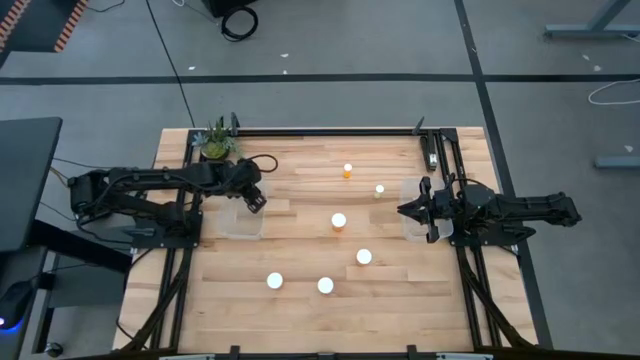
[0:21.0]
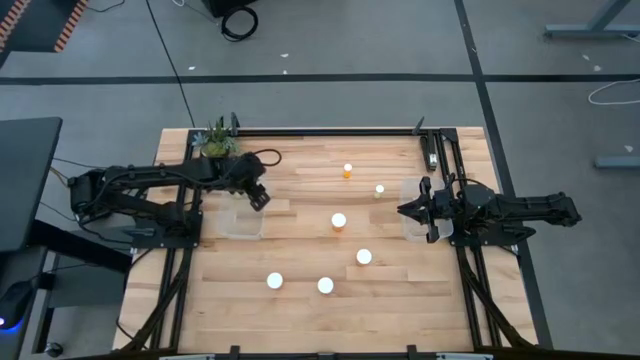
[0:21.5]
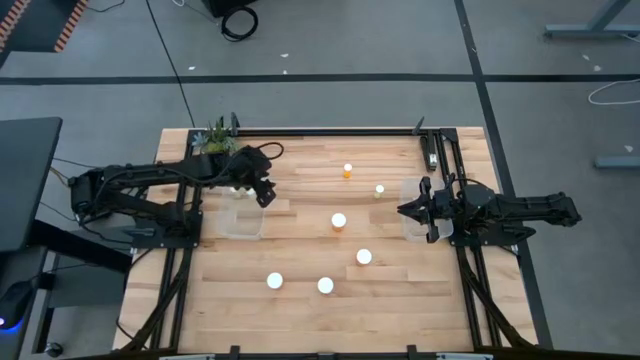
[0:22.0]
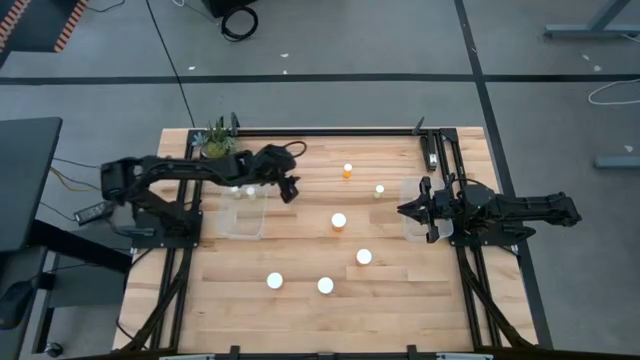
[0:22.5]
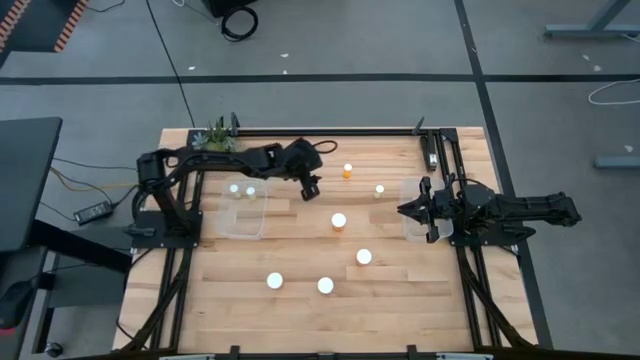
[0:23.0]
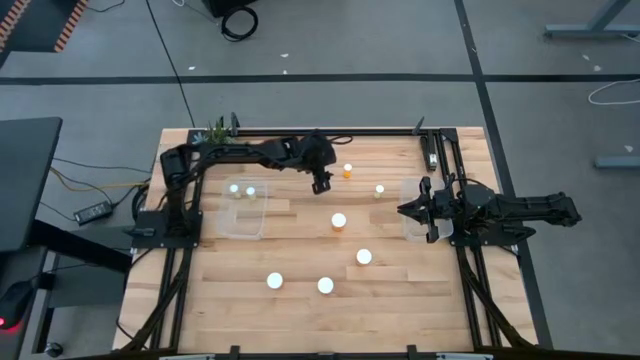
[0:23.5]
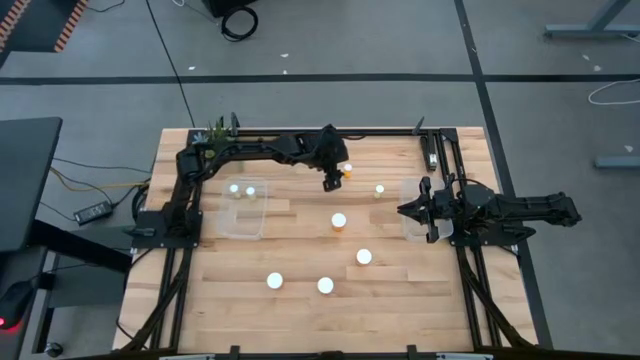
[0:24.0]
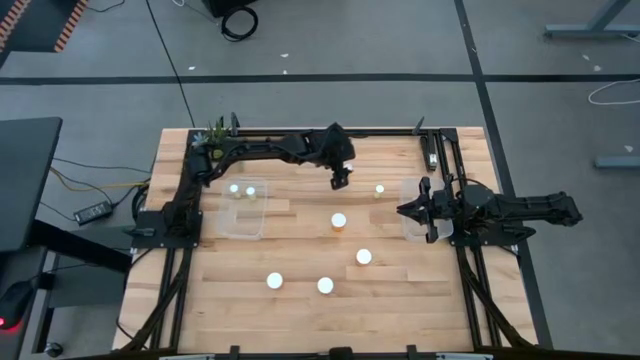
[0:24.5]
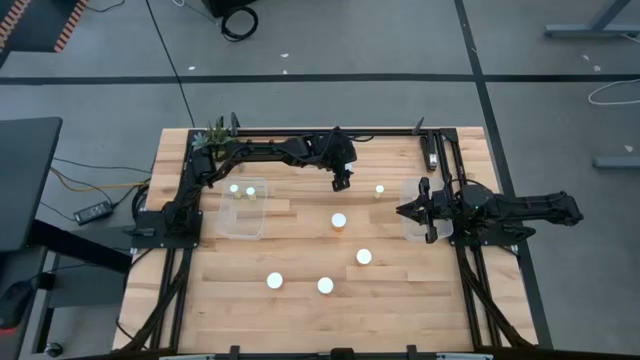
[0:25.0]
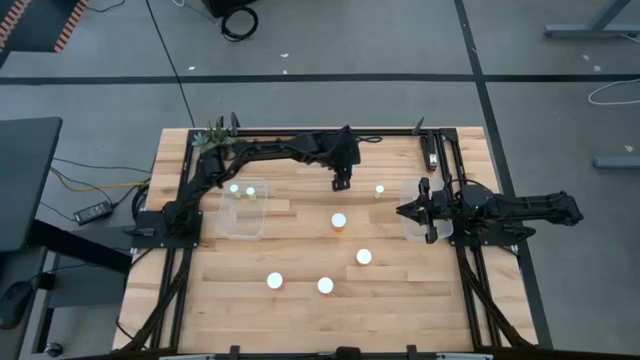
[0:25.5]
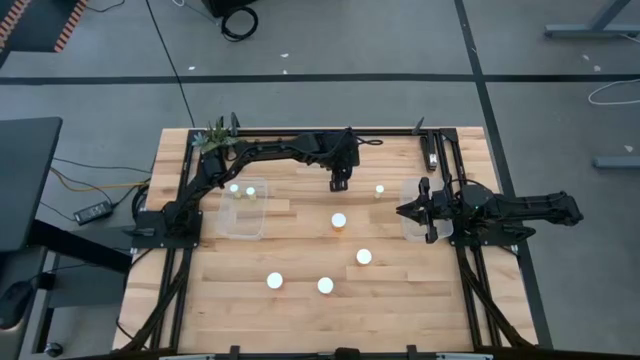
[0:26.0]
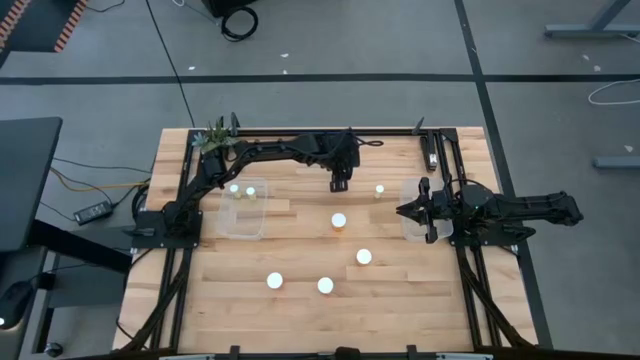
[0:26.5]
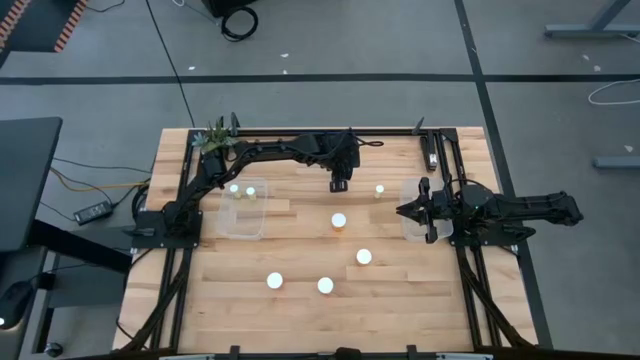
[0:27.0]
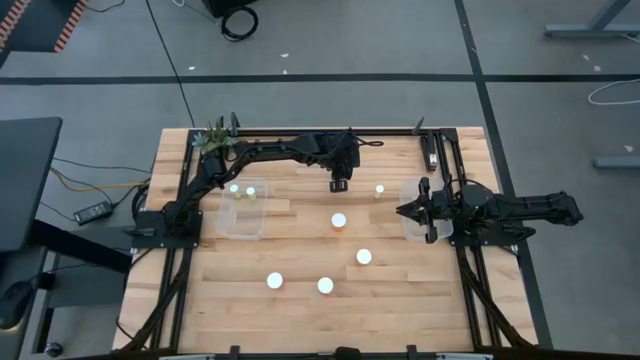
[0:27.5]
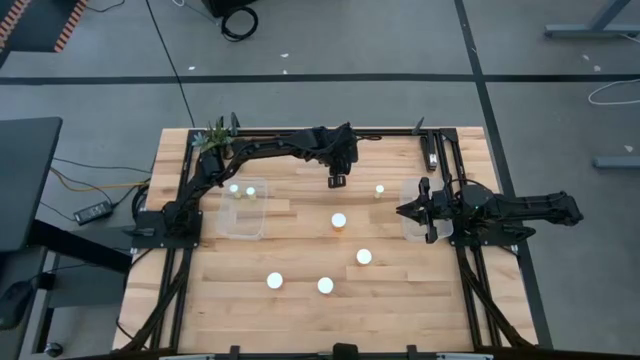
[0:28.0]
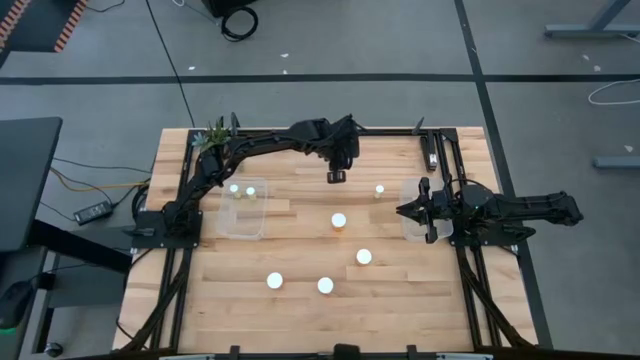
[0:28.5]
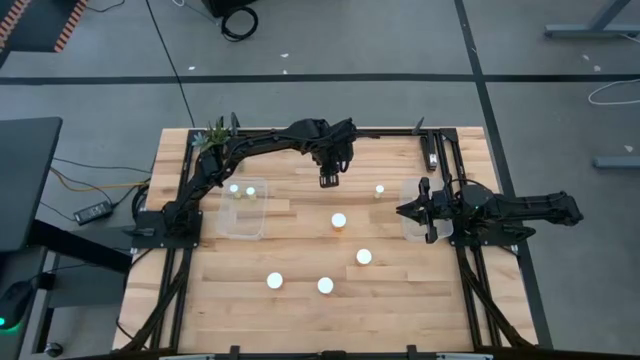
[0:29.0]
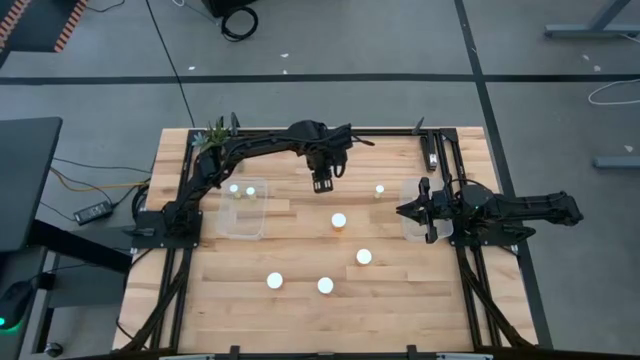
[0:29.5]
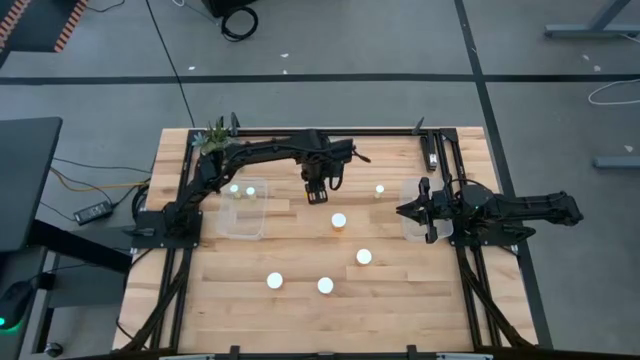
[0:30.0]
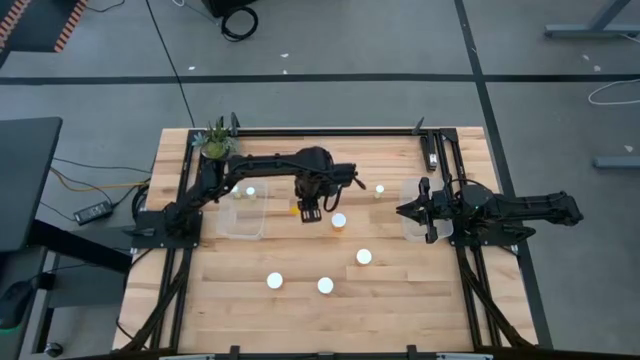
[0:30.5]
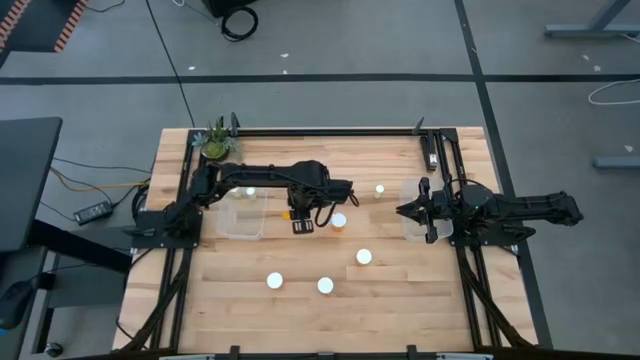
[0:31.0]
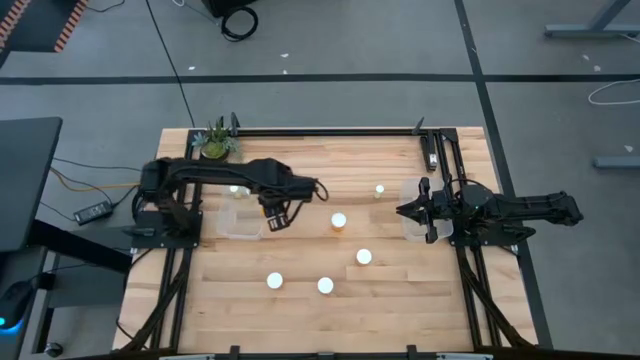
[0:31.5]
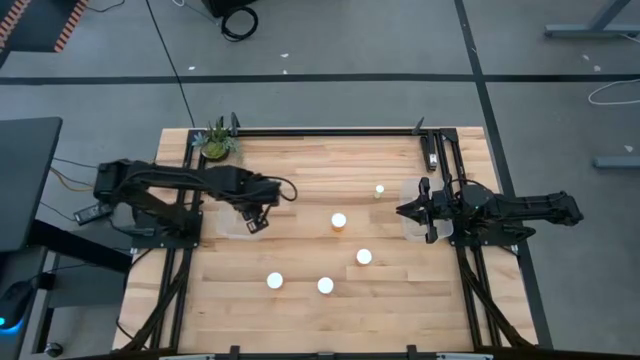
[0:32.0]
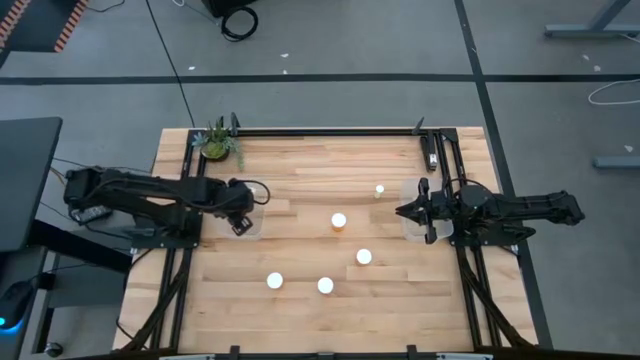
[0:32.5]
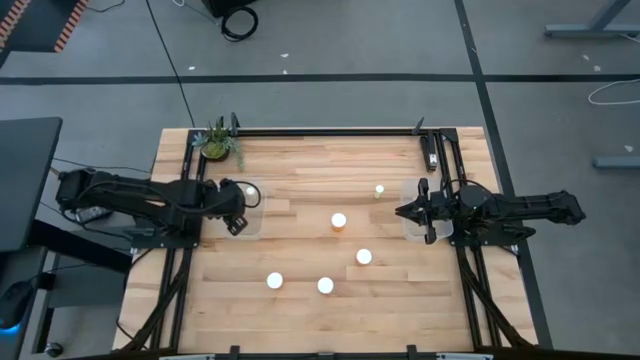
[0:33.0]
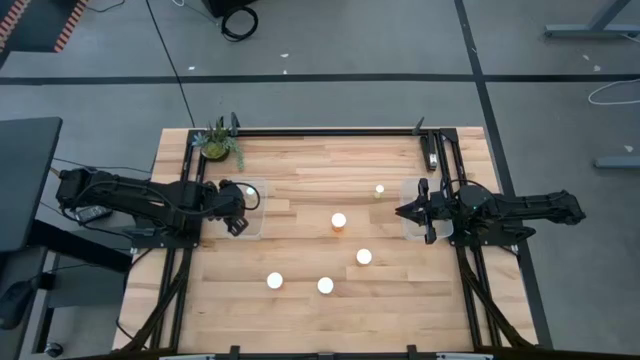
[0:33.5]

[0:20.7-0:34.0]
Task: Pick and place medicine bottles into bin by pill shape (circle, oval)
Put the small orange pill bottle into the left transparent bin

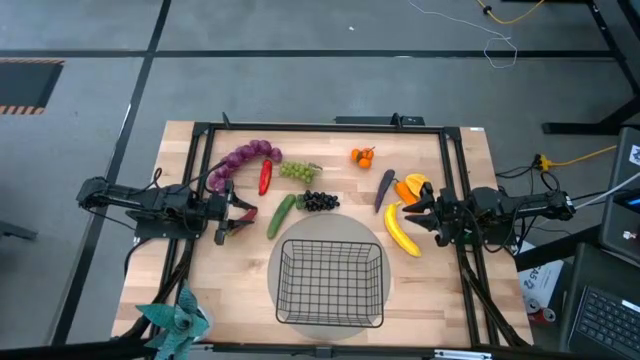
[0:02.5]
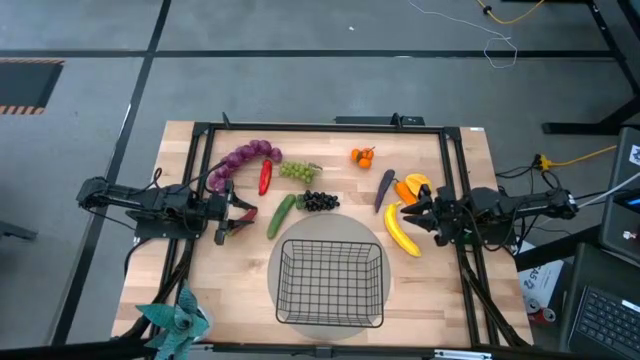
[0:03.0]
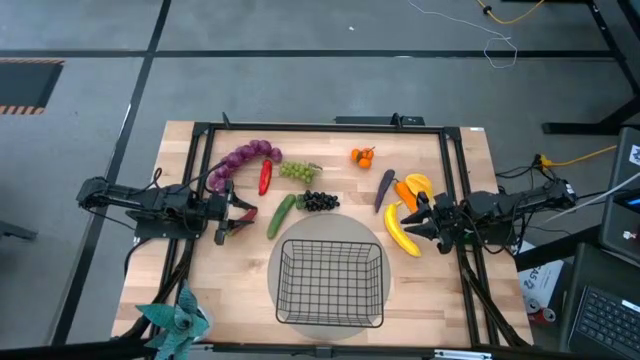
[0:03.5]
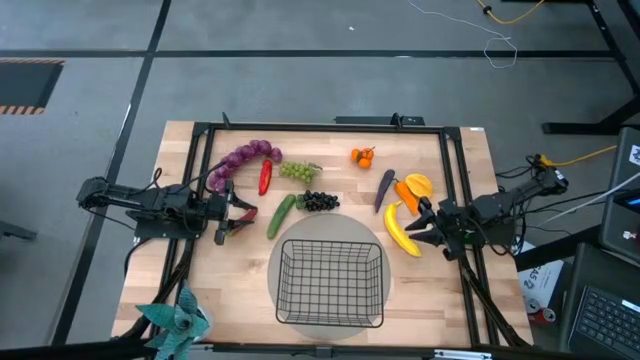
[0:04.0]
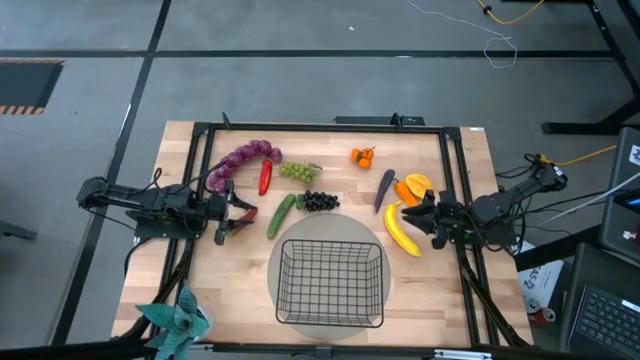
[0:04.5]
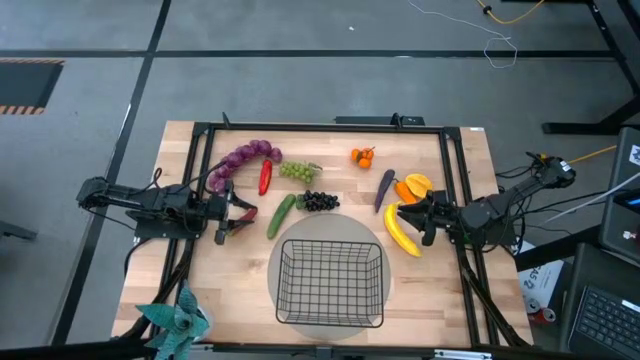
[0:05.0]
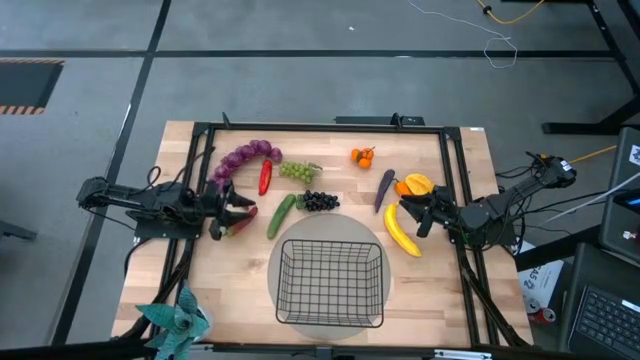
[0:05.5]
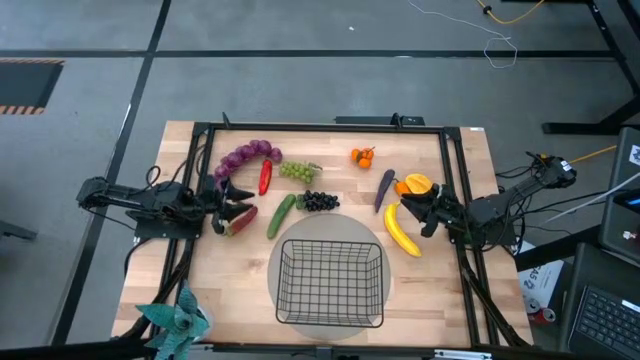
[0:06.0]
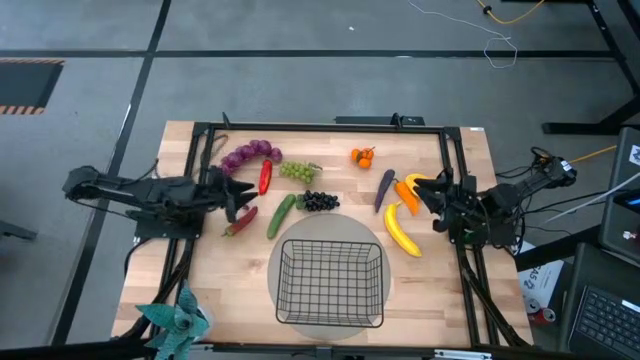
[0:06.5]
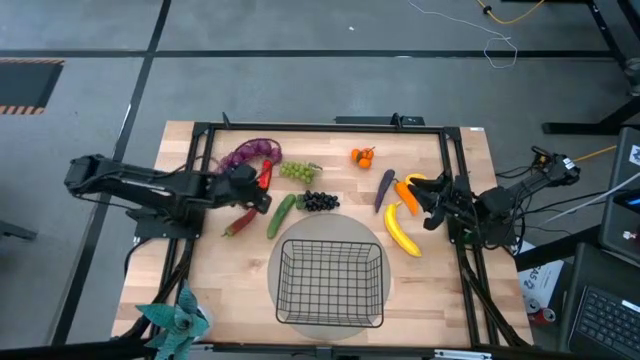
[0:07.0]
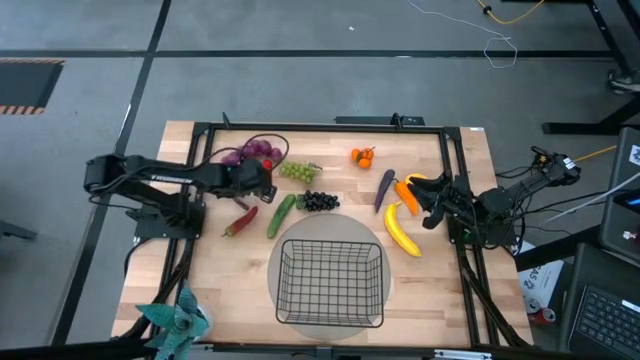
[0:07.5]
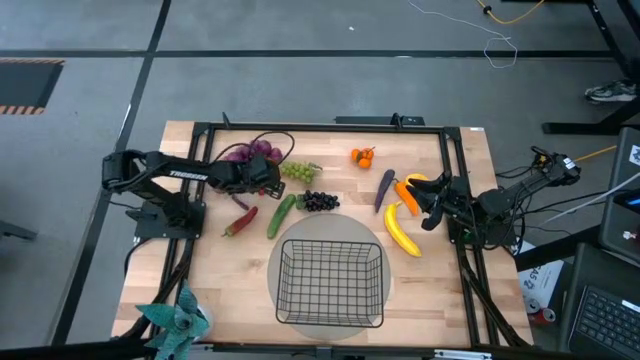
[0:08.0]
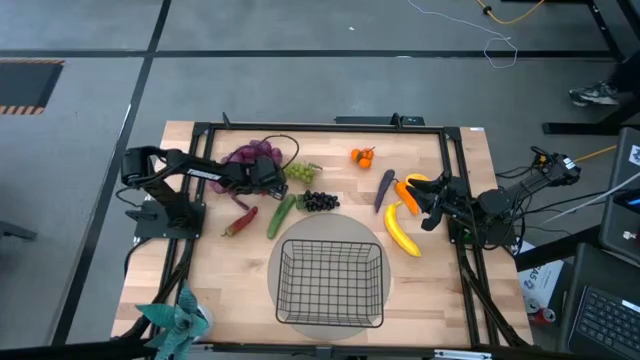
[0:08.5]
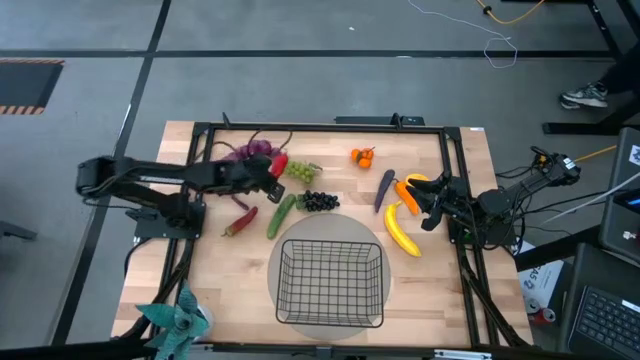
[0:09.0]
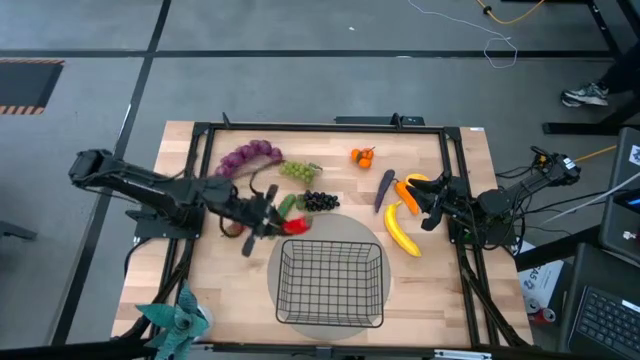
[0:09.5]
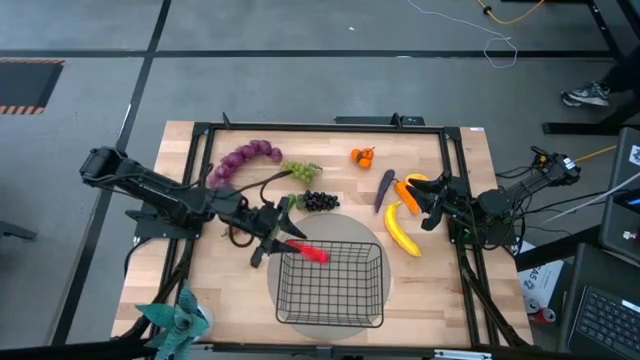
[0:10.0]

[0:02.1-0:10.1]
Task: Build produce basket
Put the top red chili pepper into the wire basket

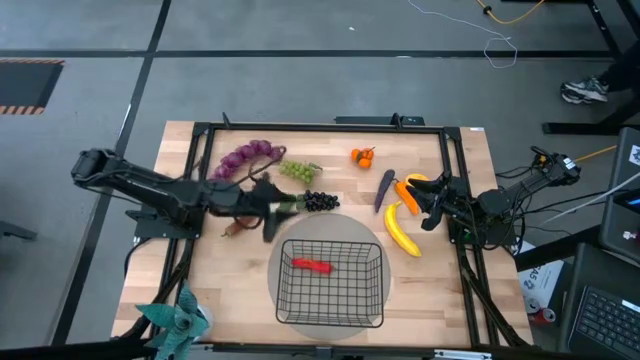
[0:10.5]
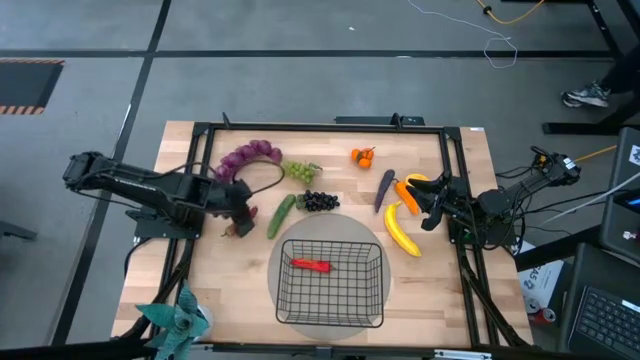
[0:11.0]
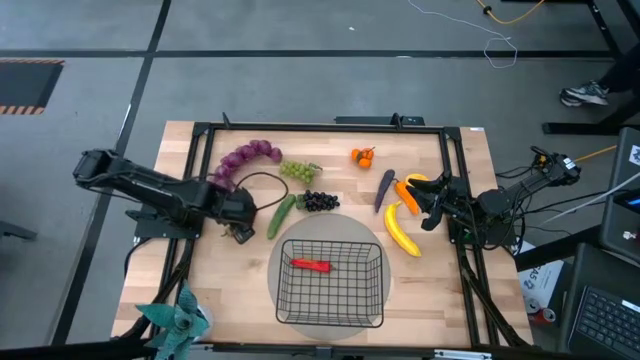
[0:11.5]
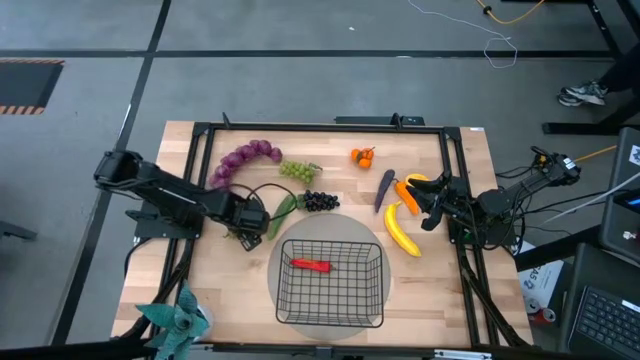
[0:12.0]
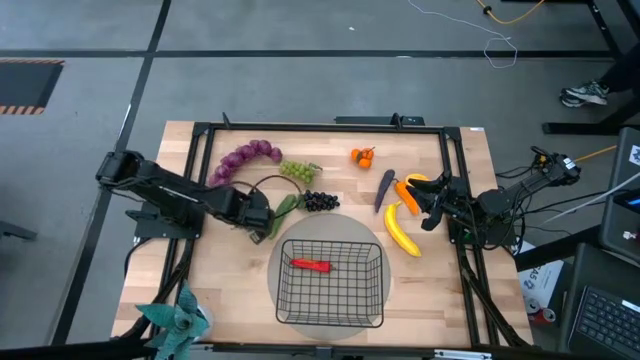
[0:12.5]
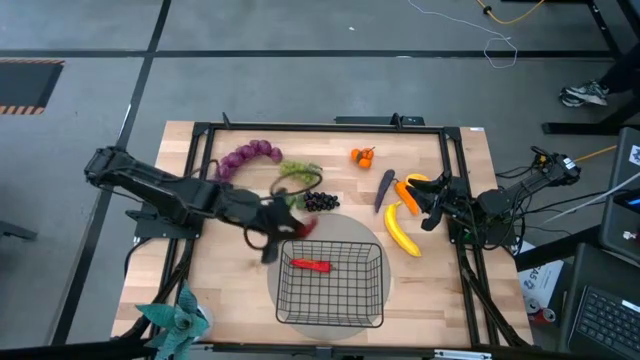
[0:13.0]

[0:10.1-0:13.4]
Put the red chili pepper into the wire basket
